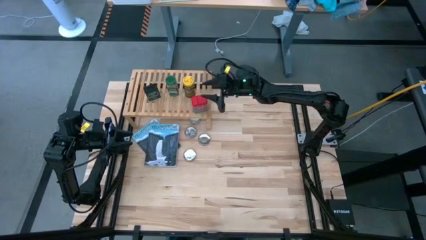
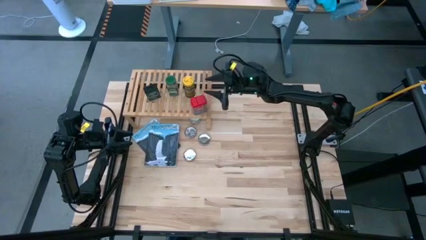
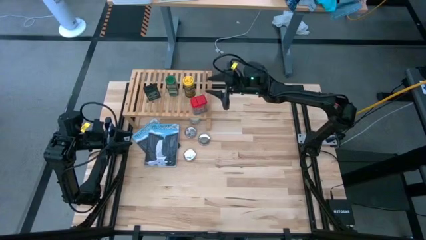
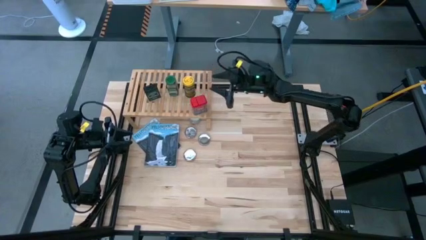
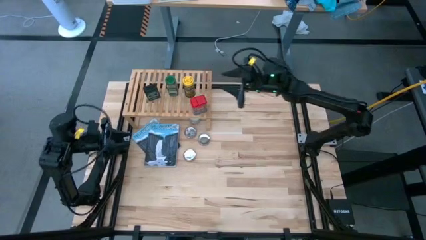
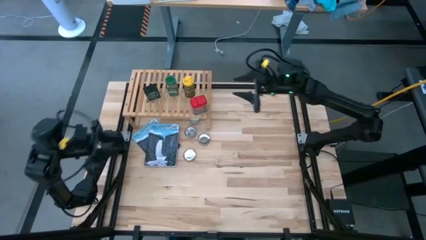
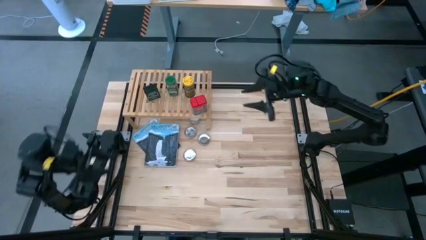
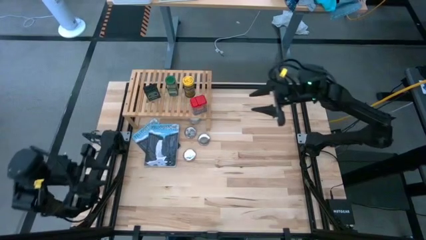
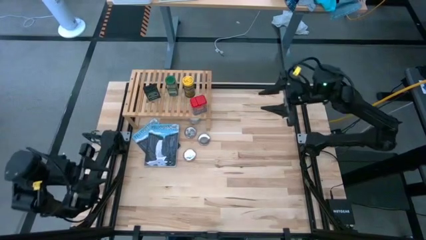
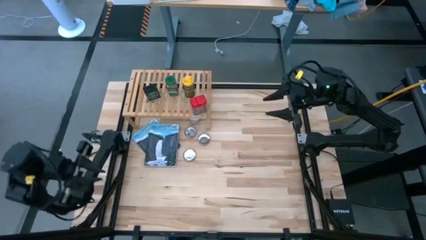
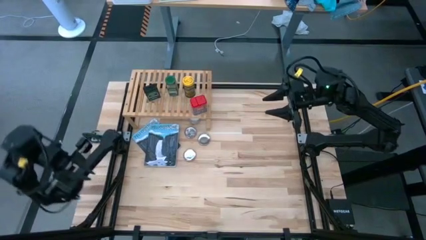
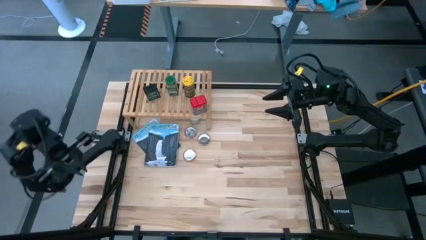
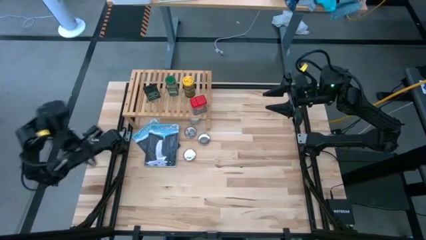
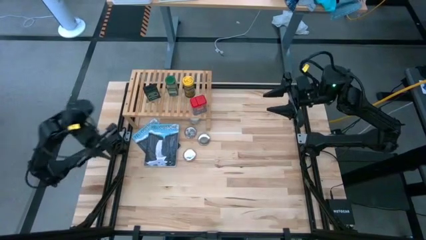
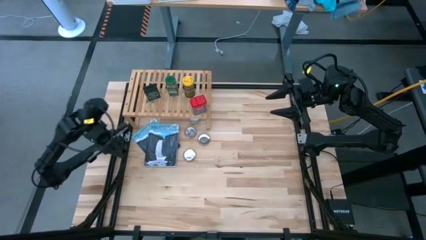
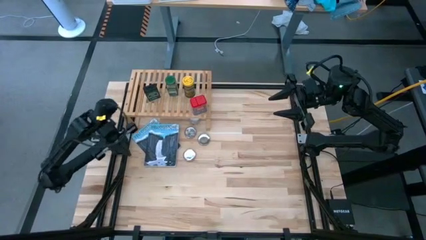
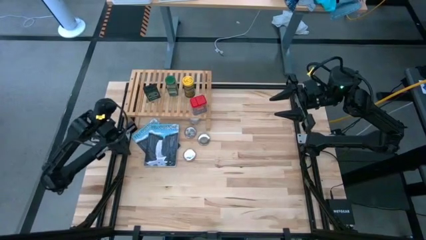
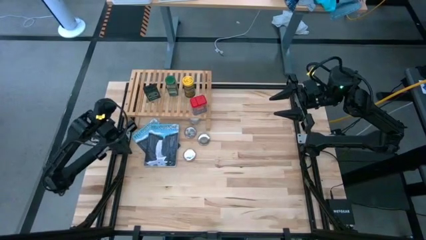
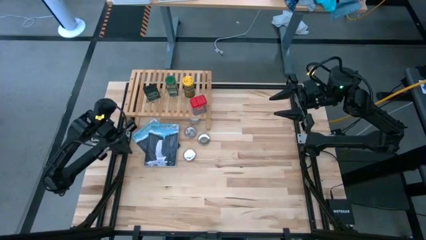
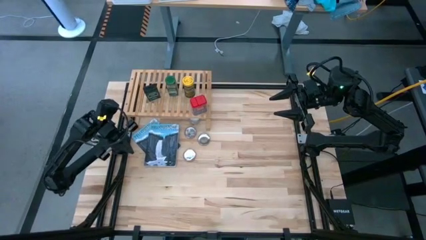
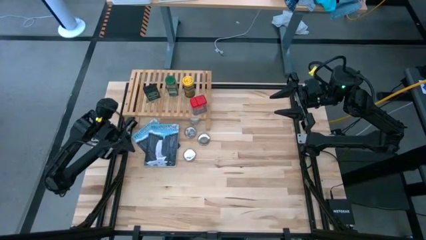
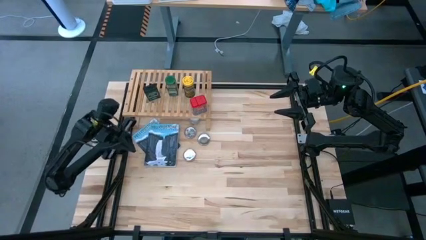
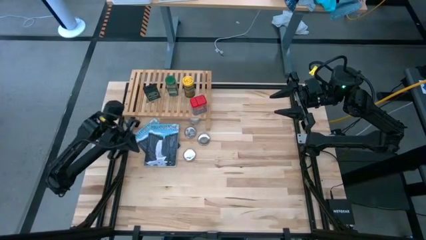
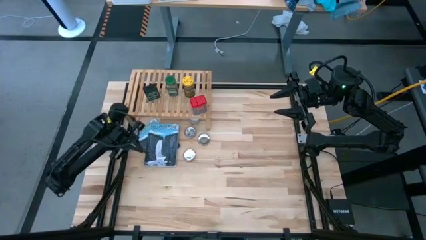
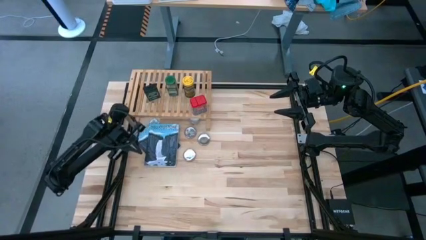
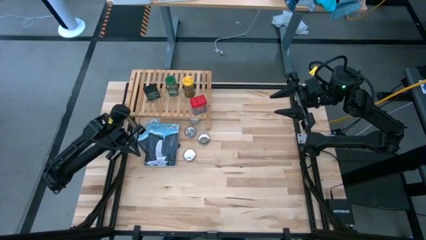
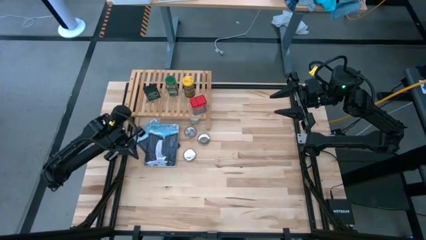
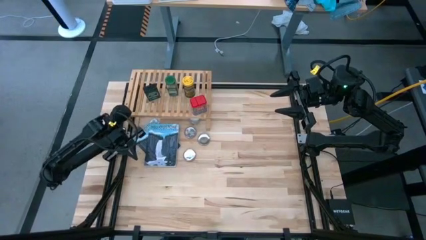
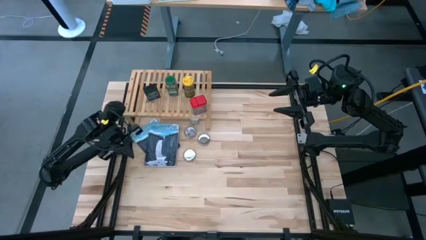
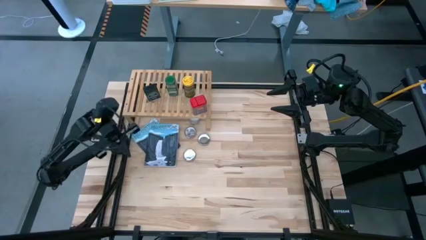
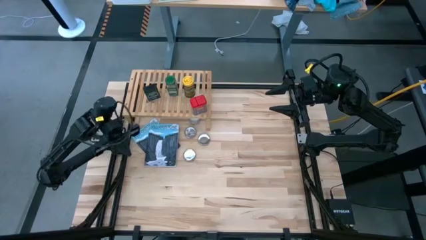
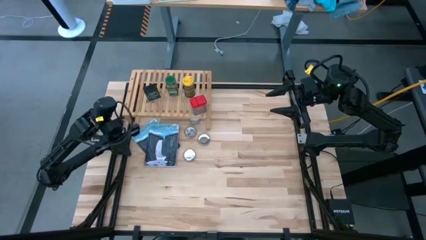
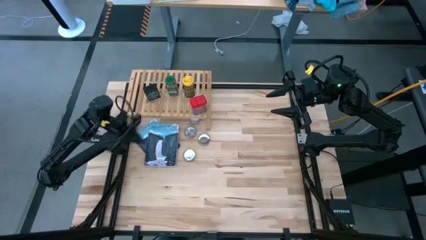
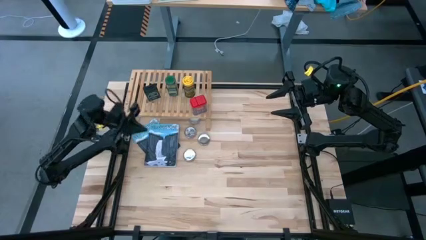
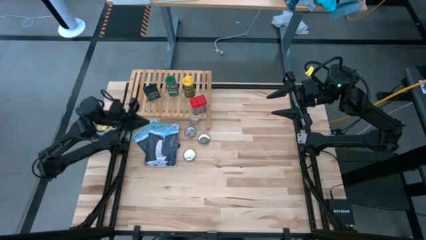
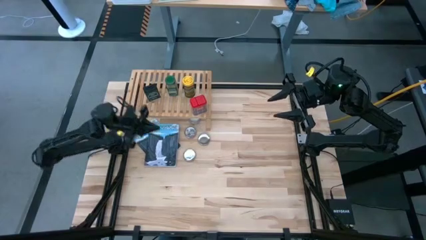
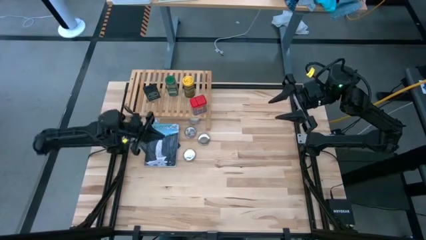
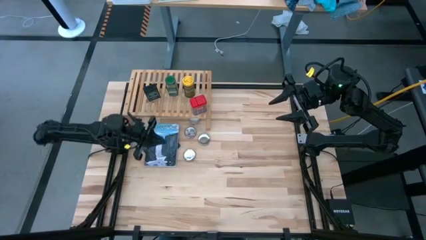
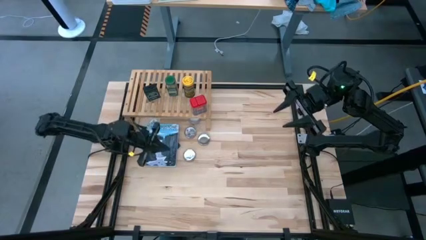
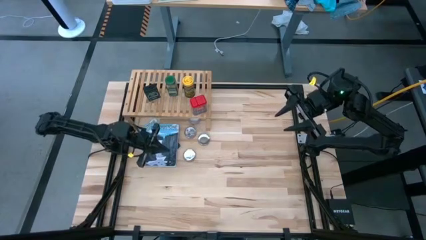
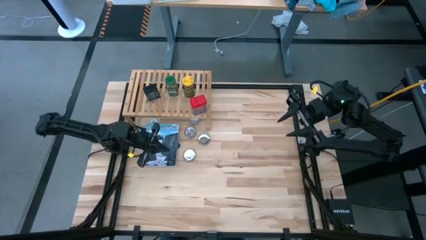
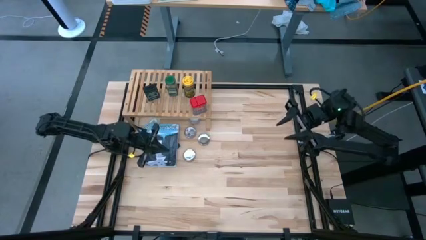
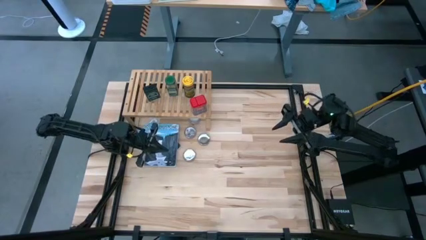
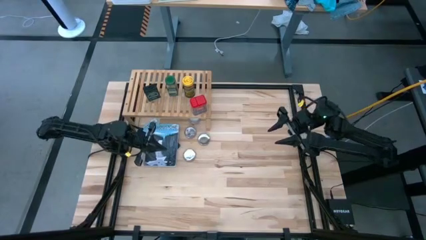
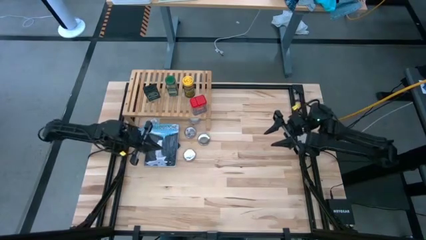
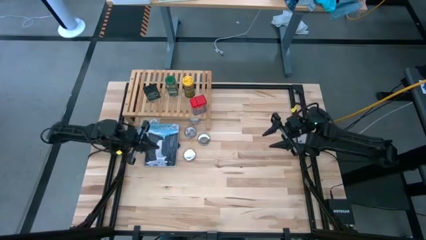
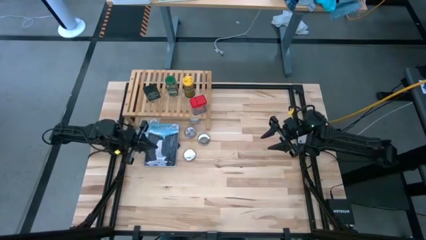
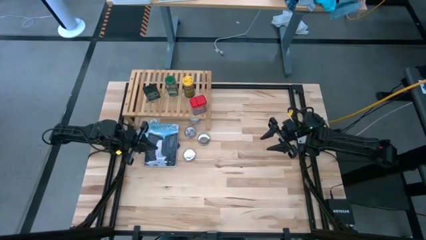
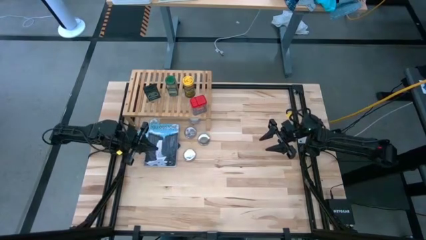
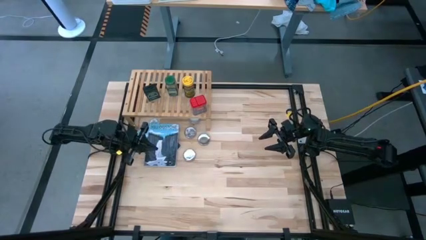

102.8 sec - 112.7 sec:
Task: Shelf spices
Return to Home Position

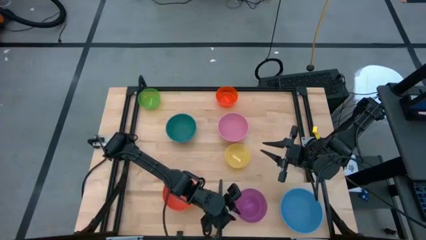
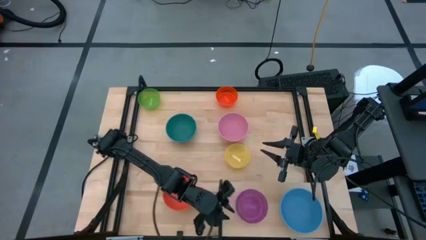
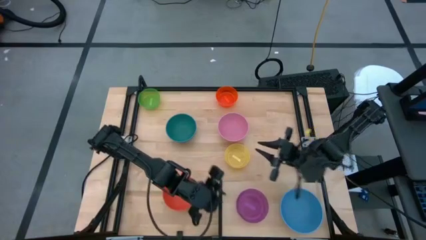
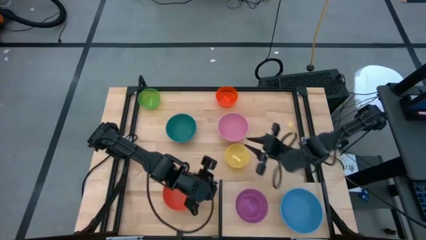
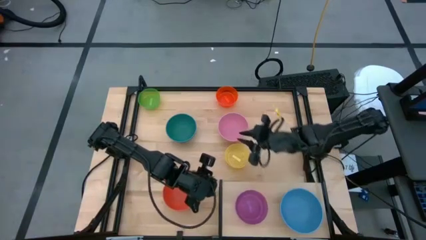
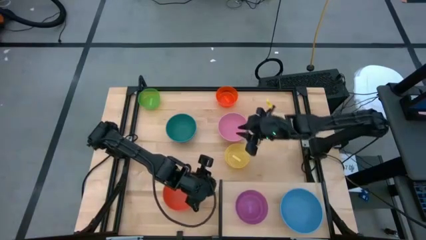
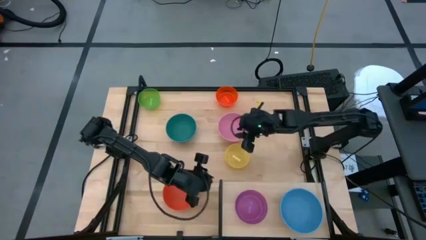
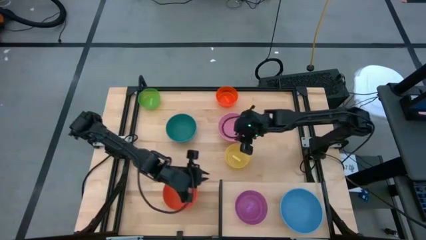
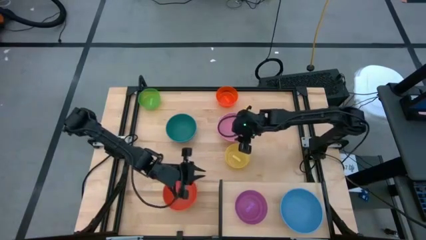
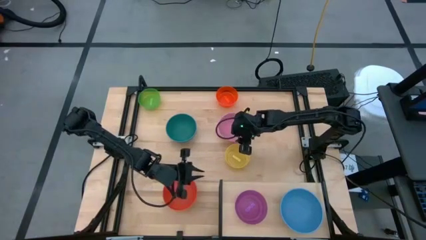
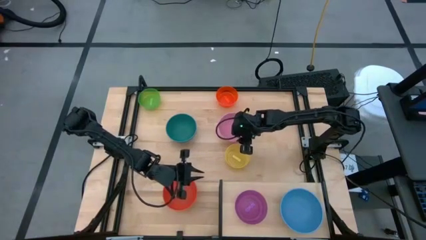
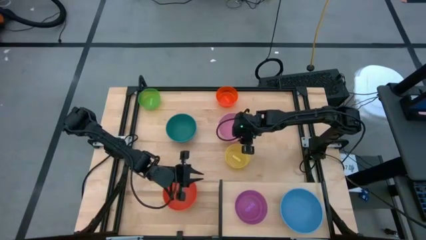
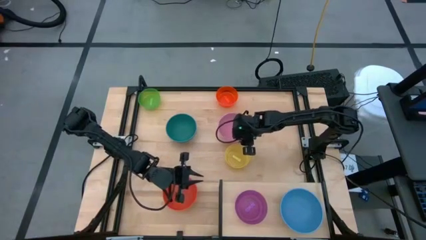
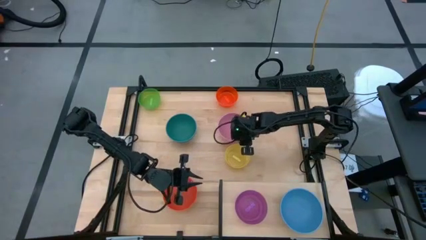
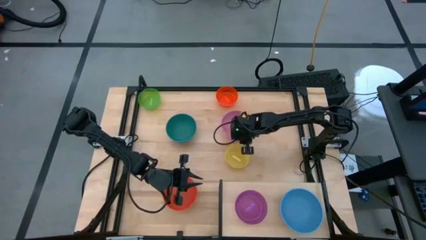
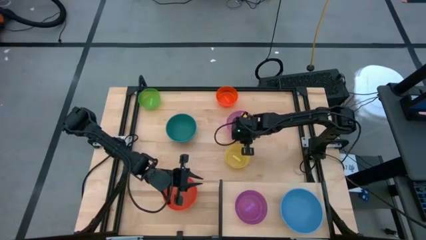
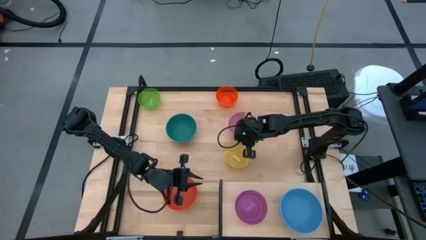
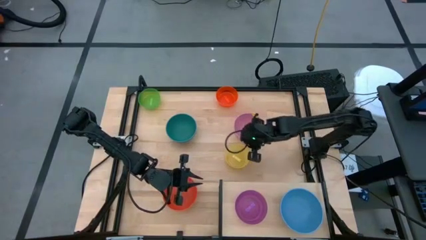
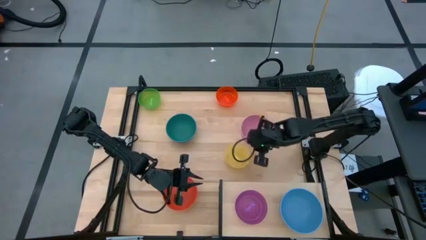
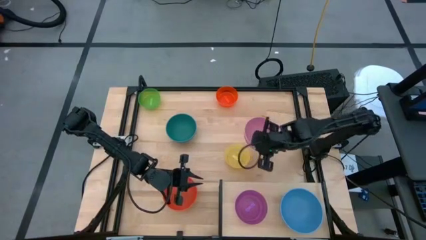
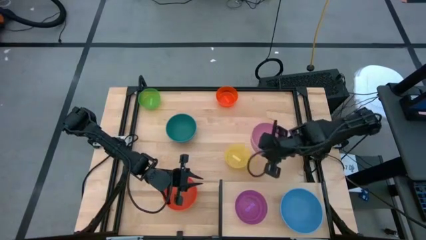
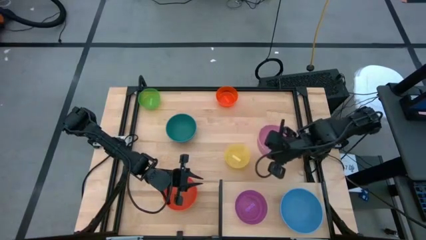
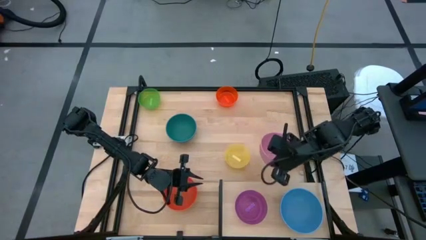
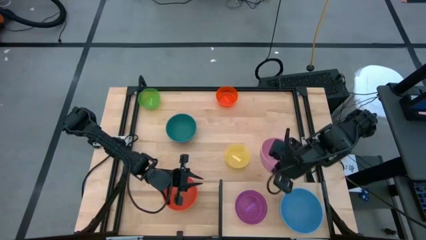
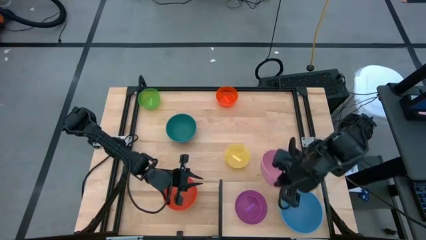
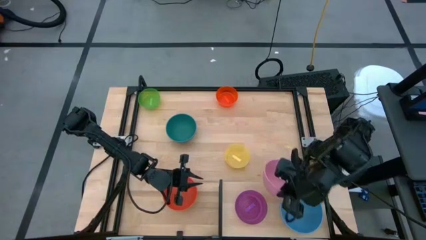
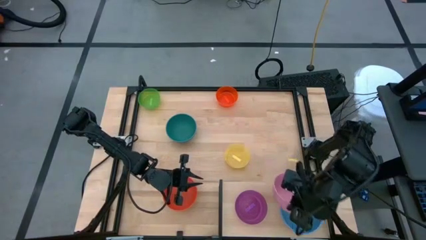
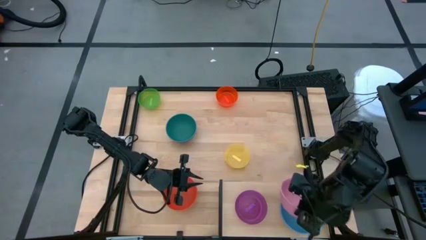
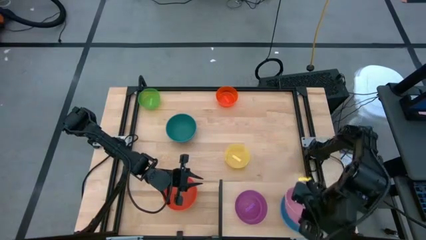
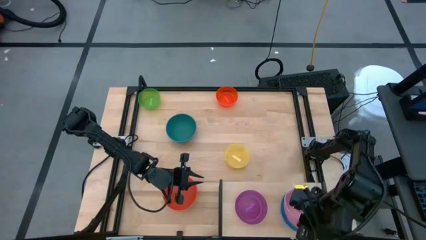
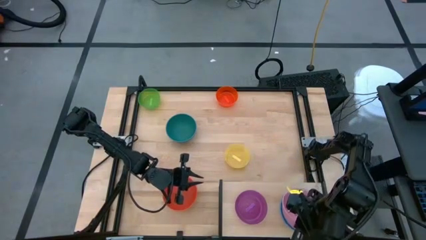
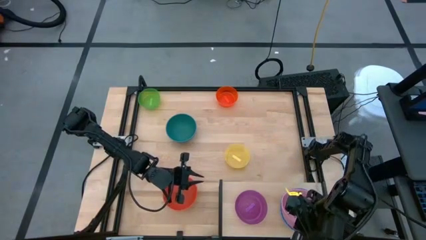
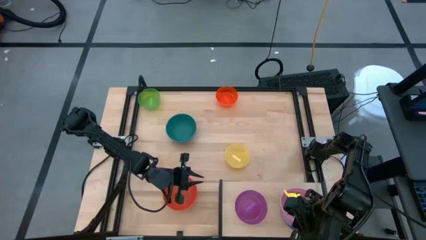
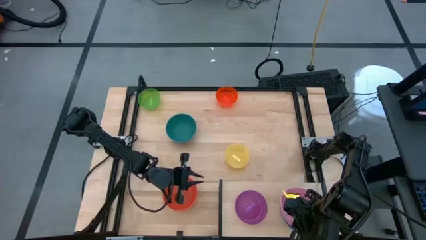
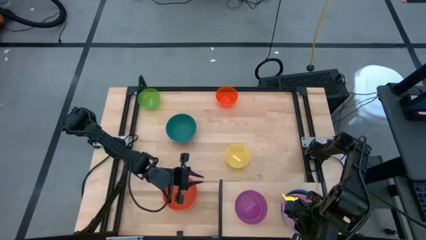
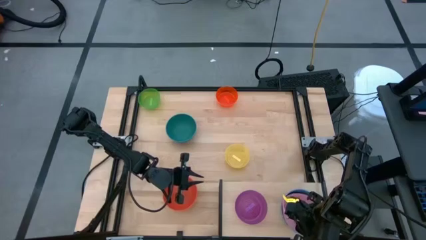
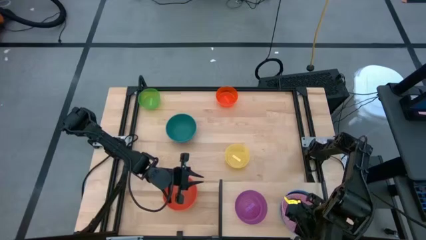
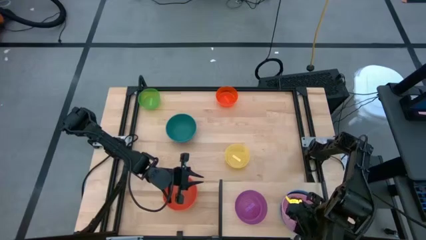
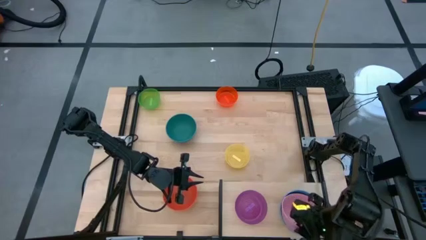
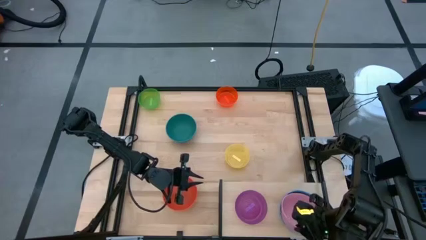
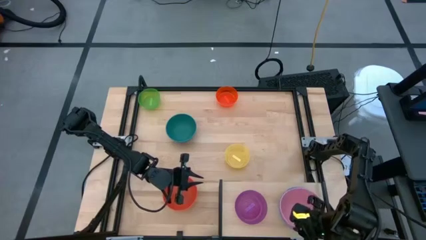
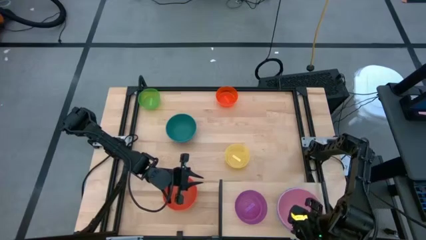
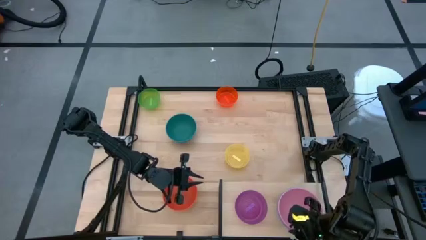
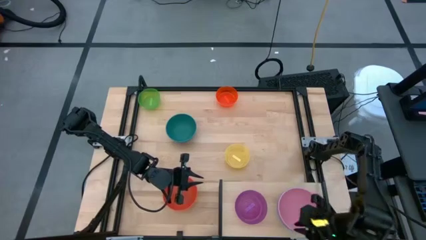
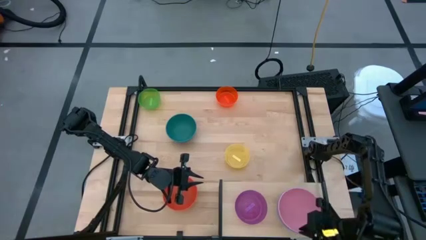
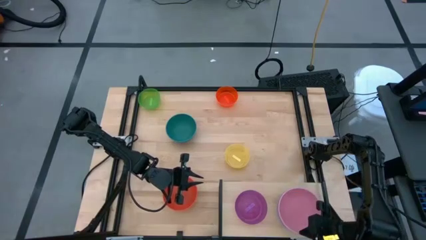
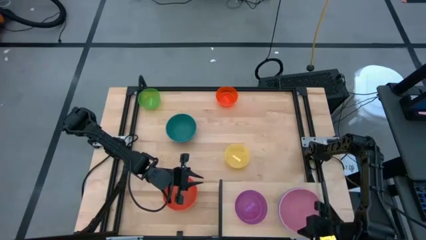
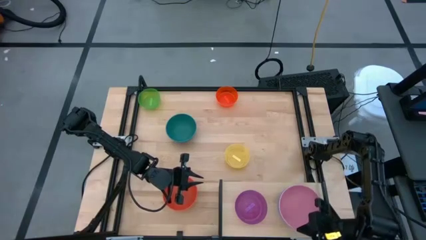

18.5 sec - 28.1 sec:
Task: Place and stack bowls onto a shelf
Stack the pink bowl on top of the blue bowl on the shelf
